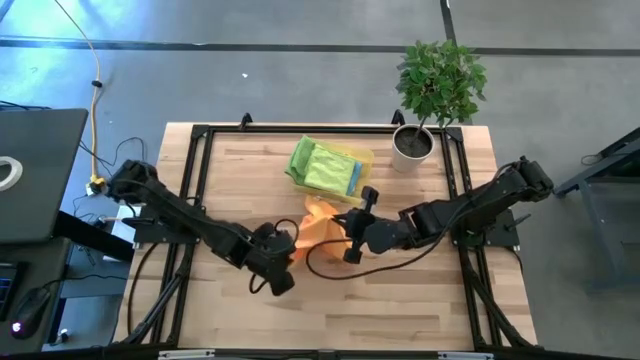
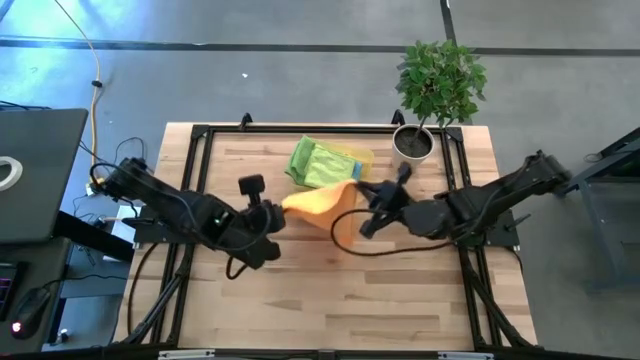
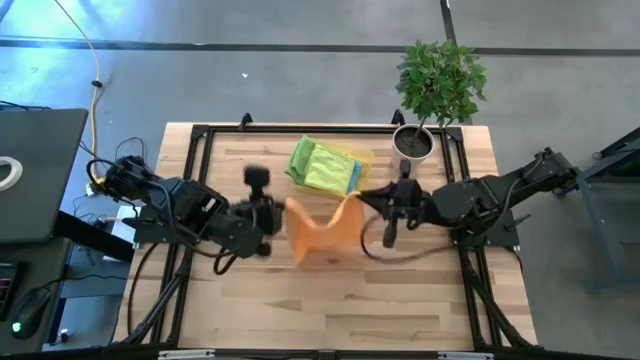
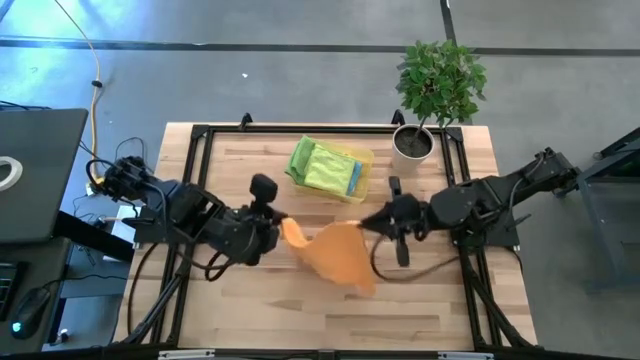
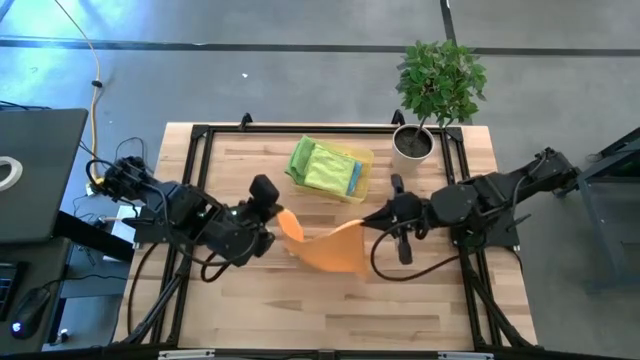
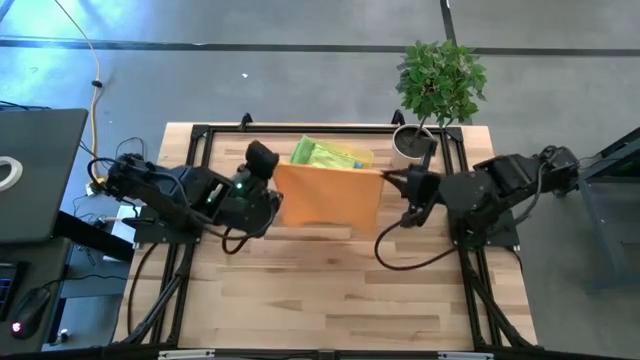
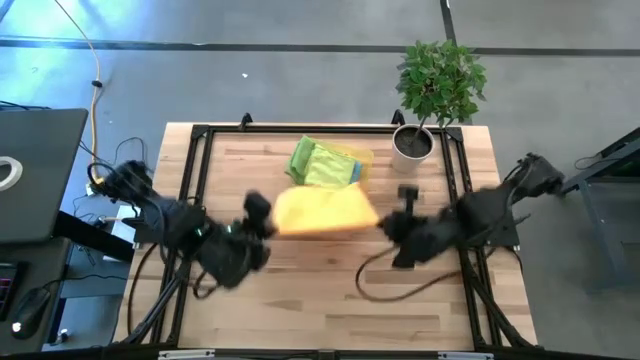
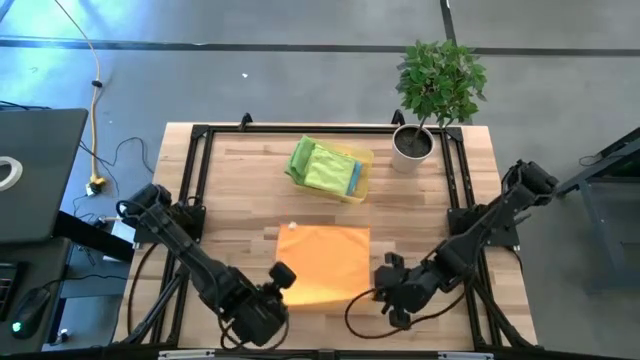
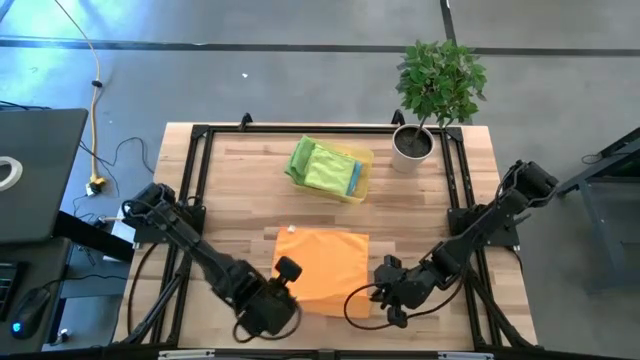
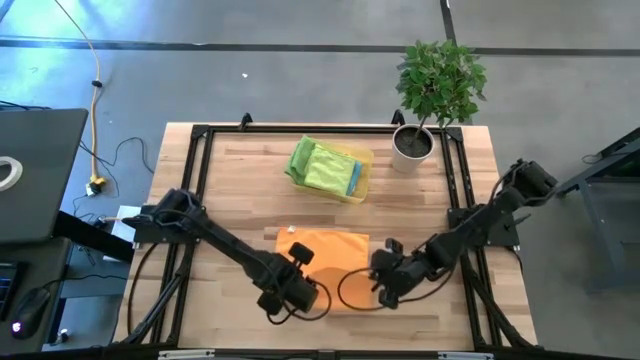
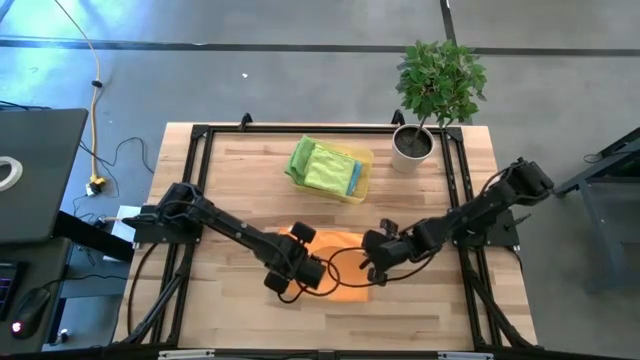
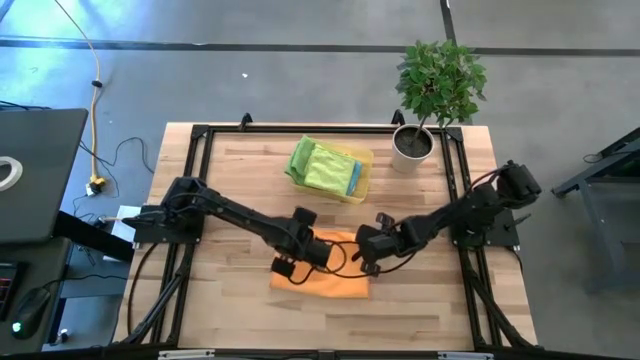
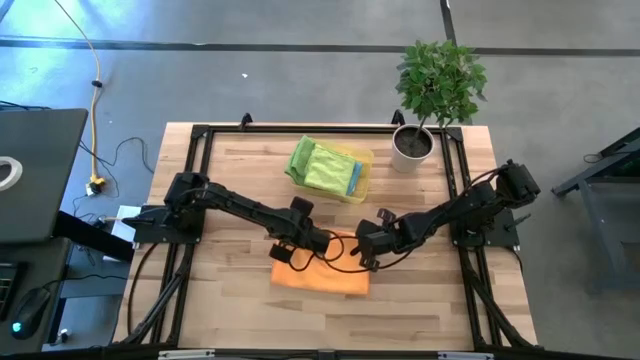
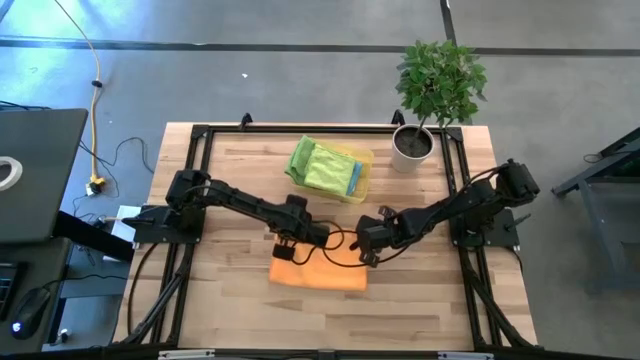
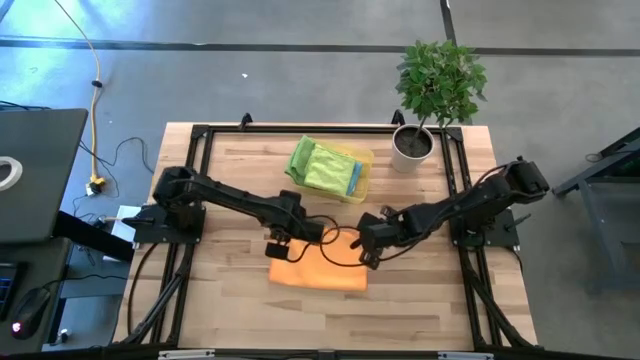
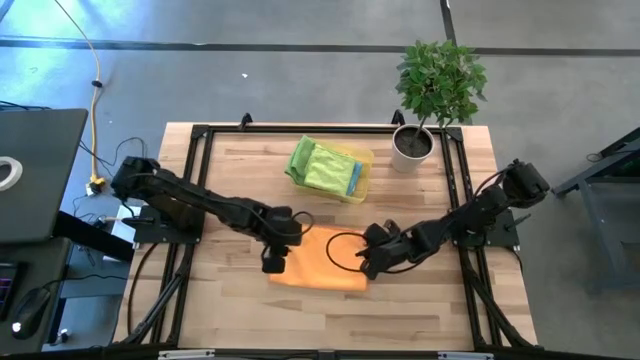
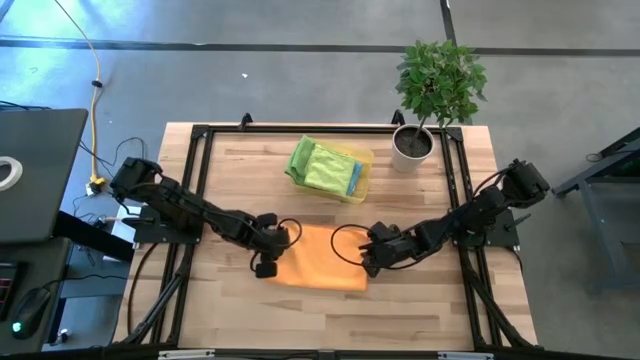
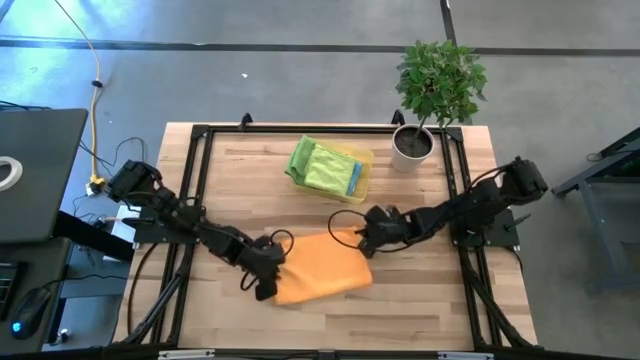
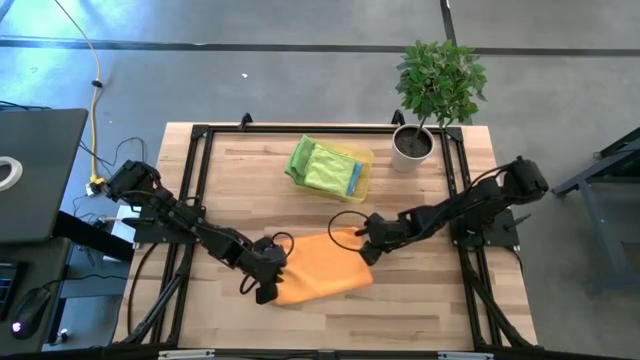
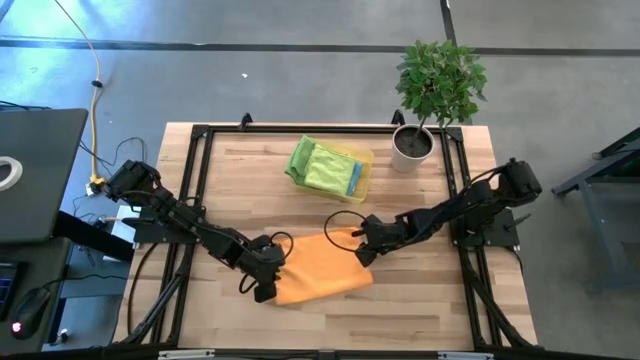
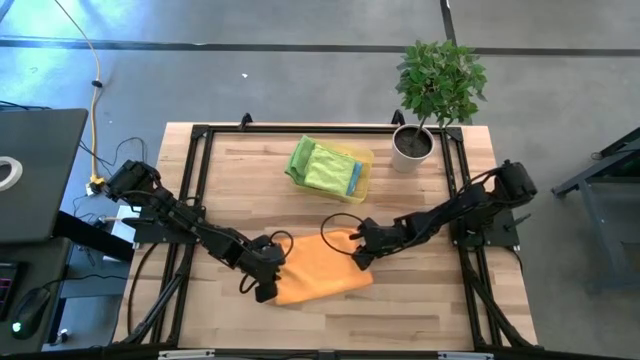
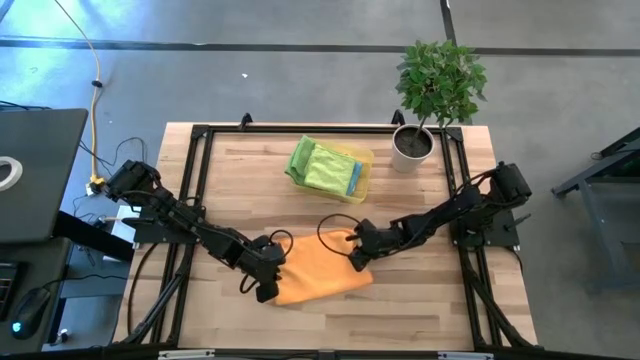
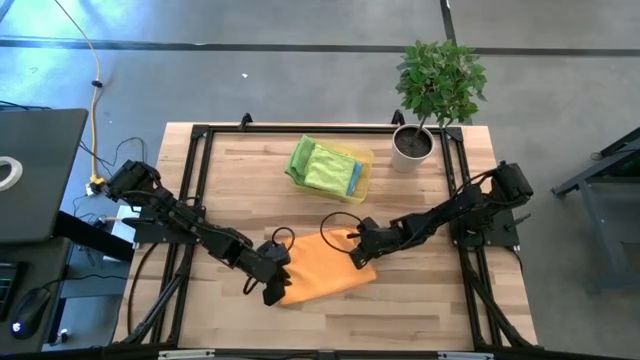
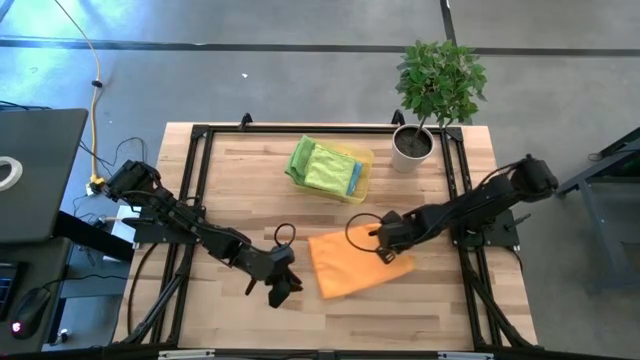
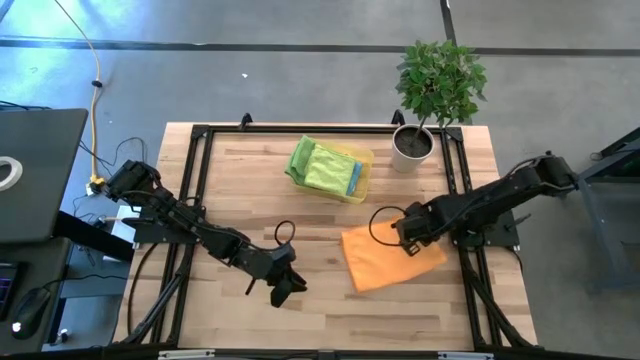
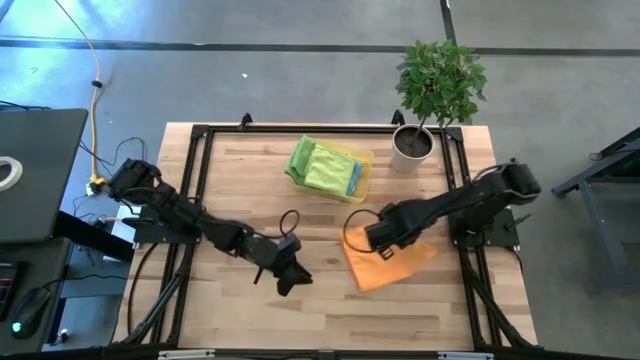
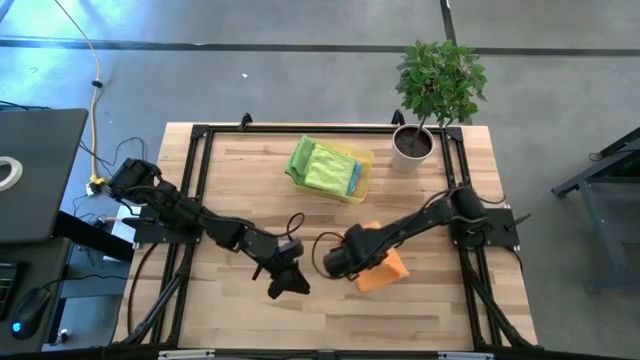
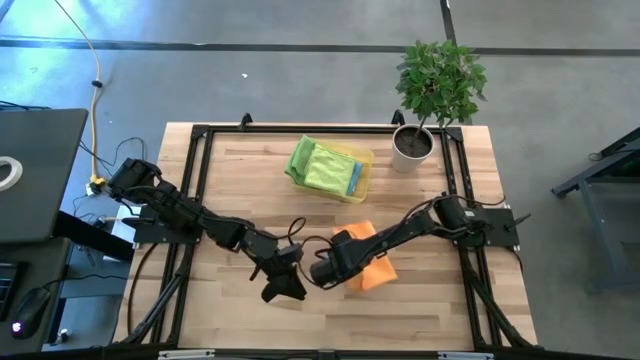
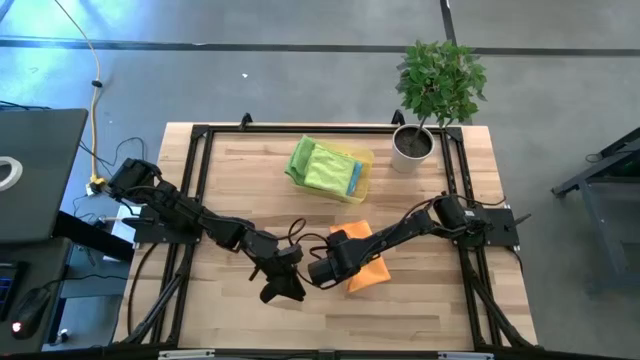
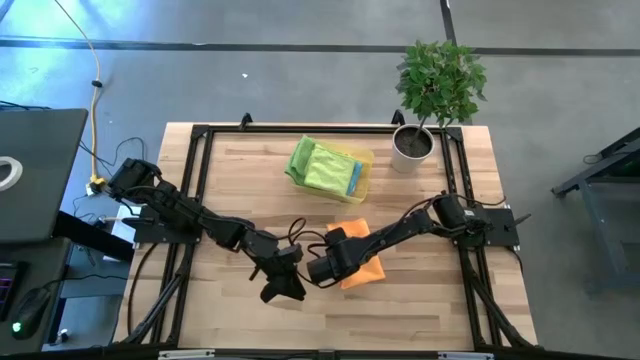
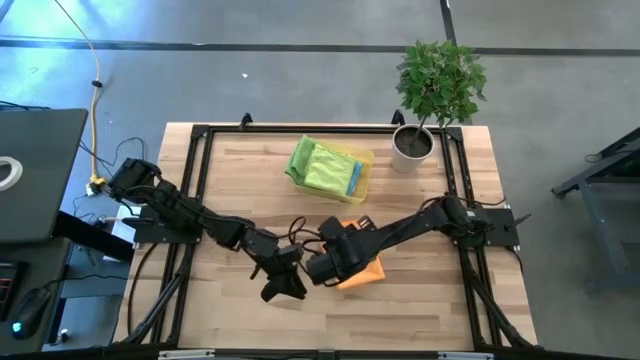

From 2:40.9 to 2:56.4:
Task: Fold microfiber towels
Fold the orange microfiber towel

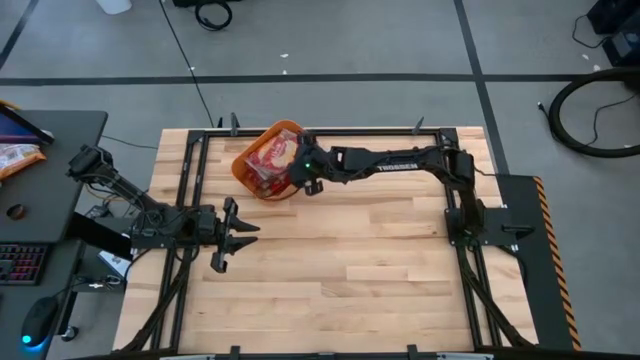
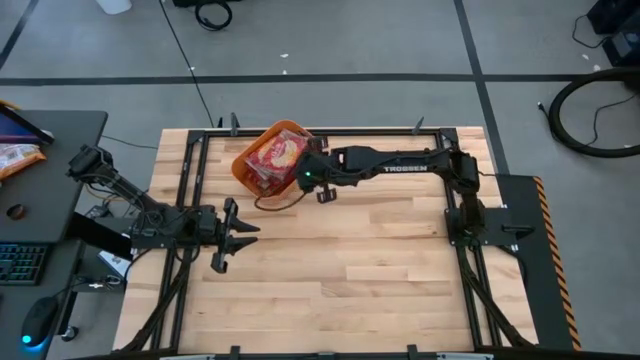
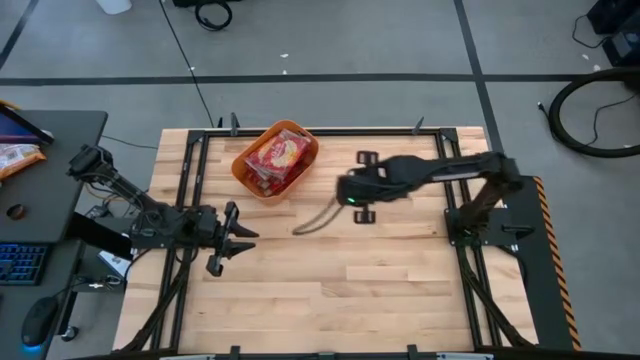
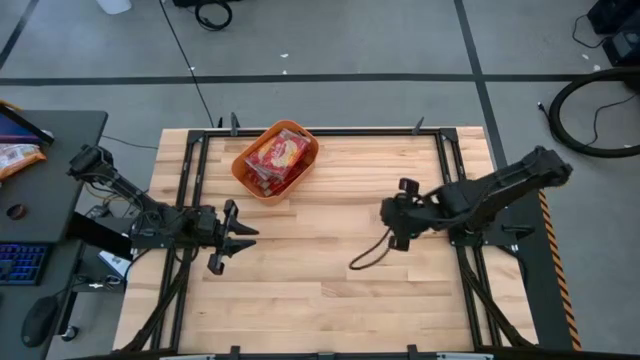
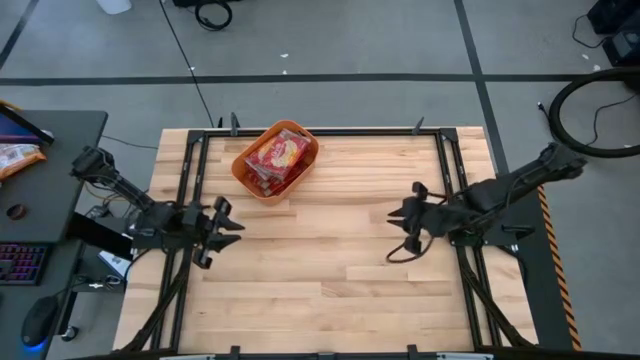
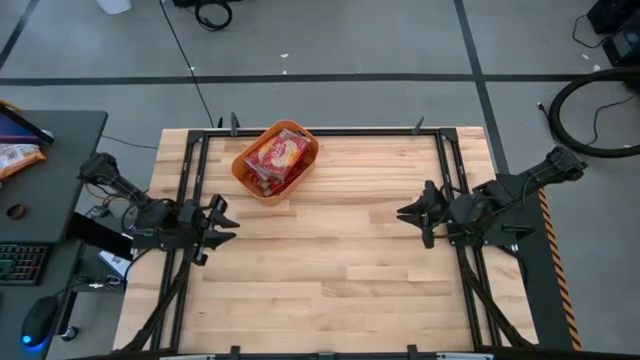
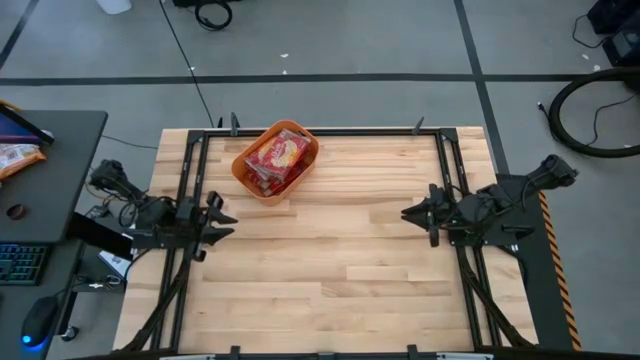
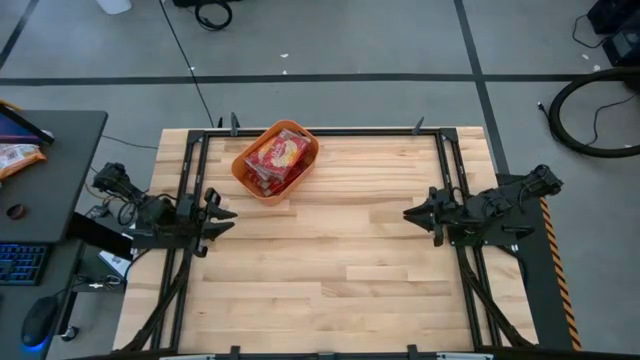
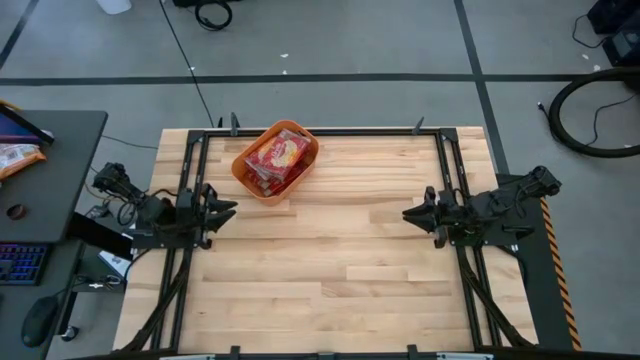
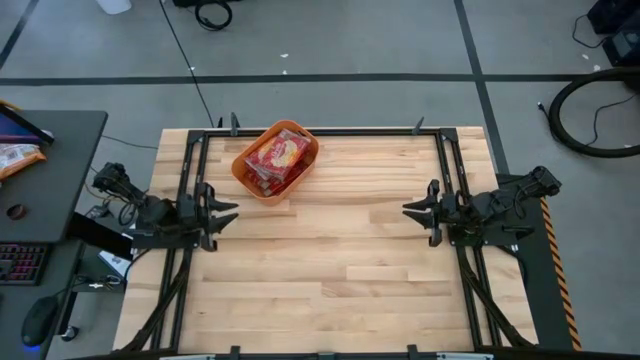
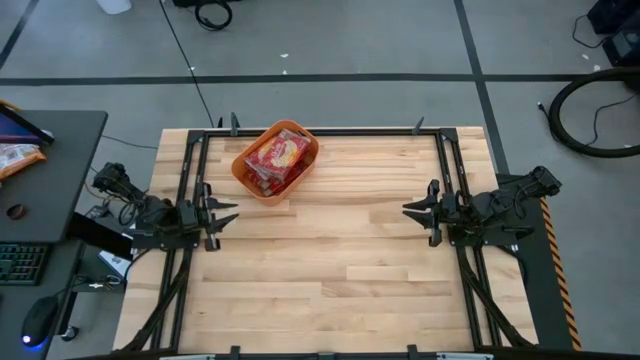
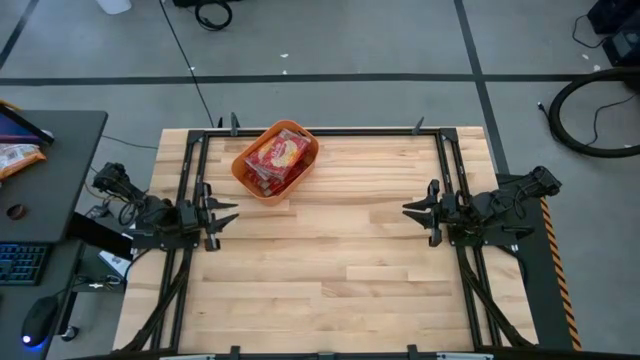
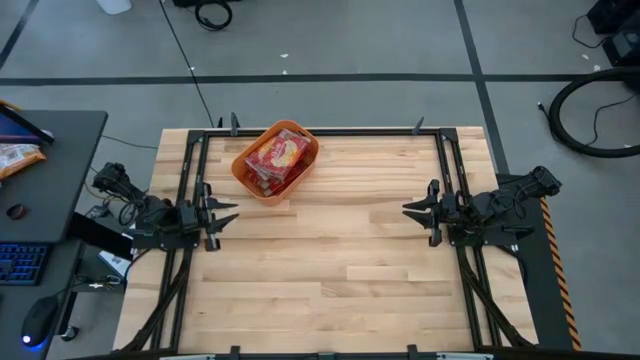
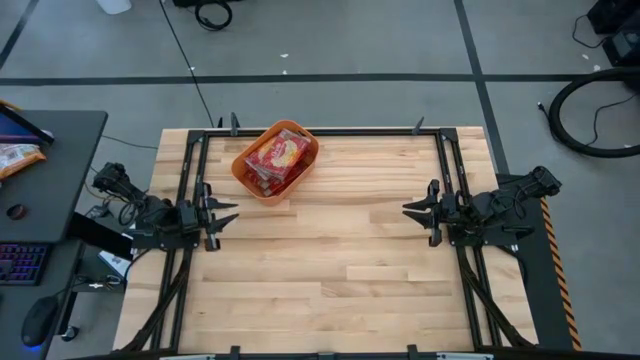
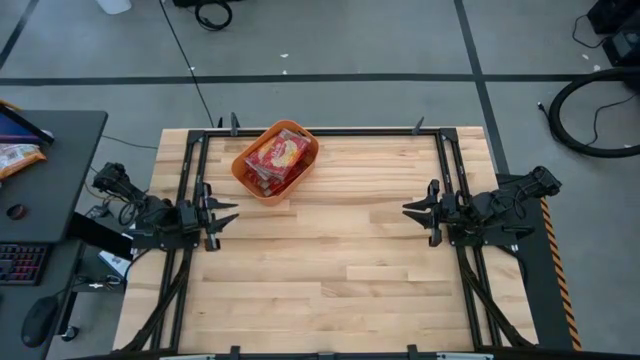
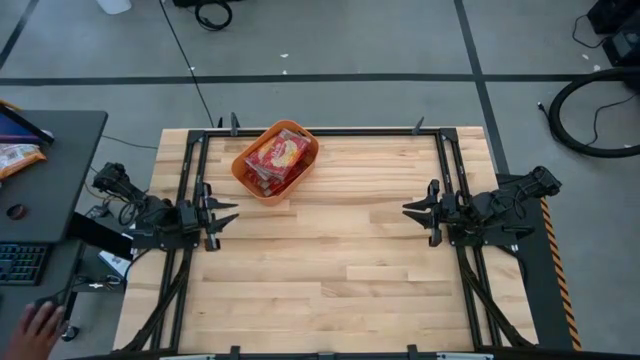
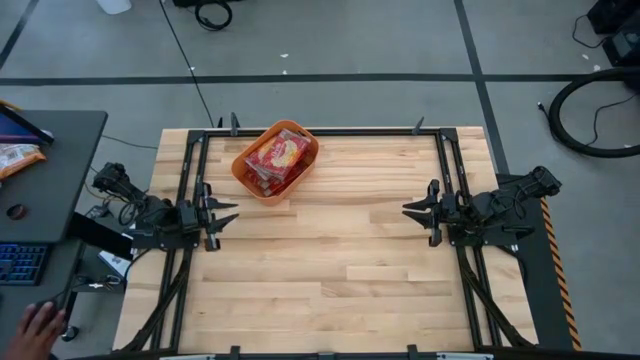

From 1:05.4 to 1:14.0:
Task: Sort popcorn bags into baskets
Return to Home Position
